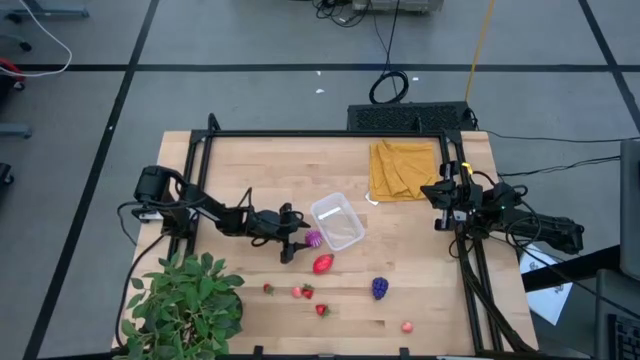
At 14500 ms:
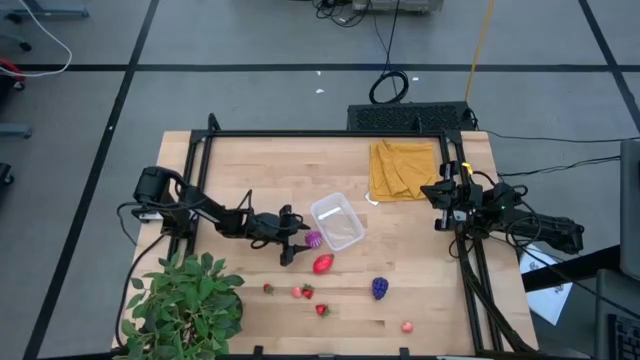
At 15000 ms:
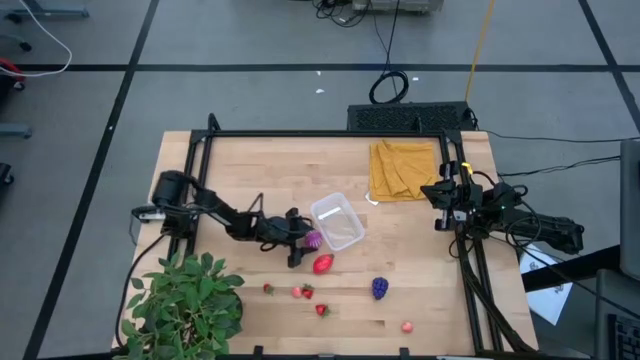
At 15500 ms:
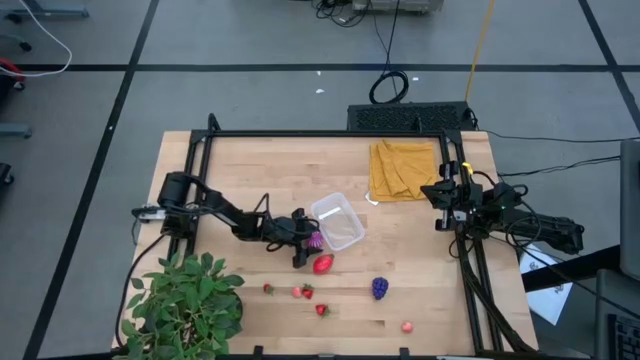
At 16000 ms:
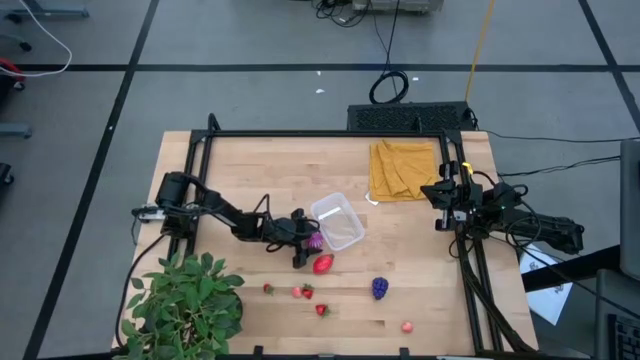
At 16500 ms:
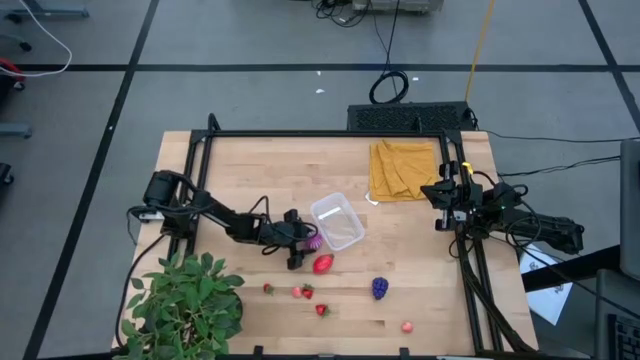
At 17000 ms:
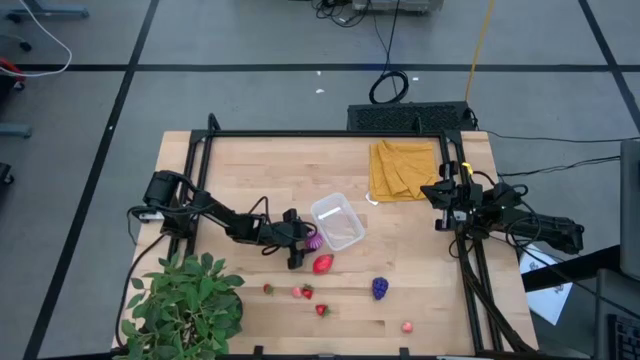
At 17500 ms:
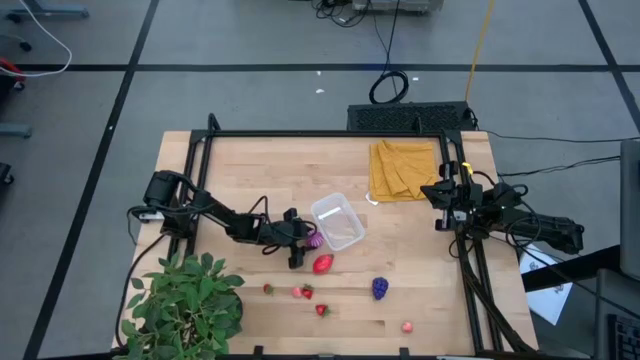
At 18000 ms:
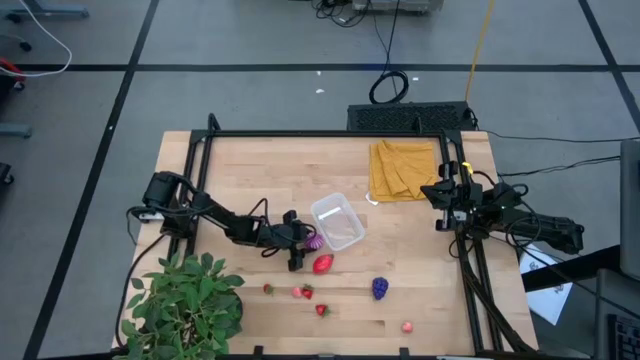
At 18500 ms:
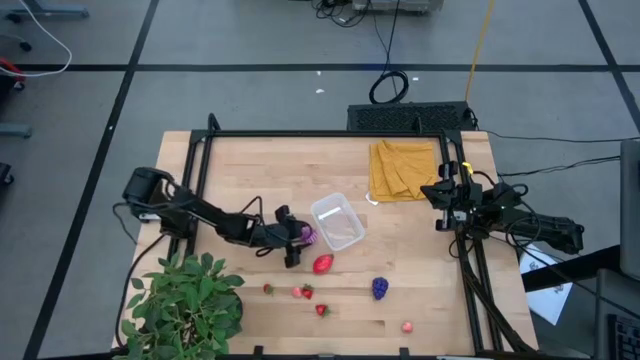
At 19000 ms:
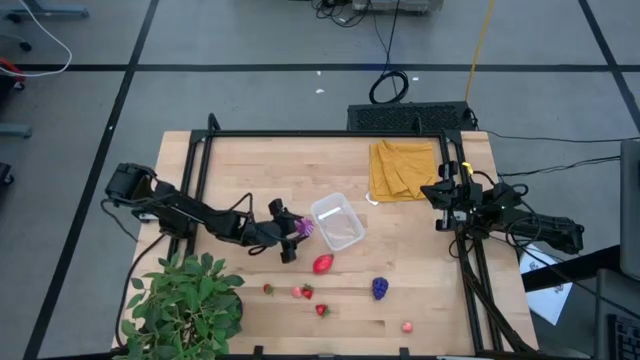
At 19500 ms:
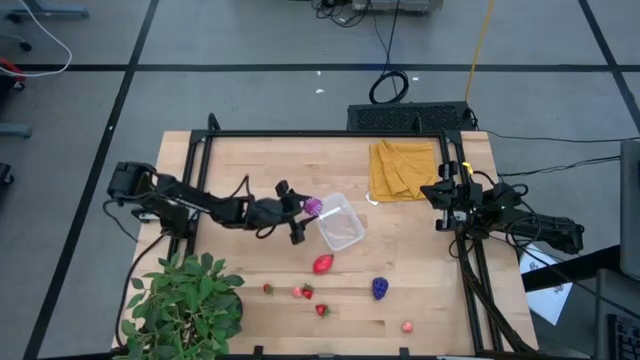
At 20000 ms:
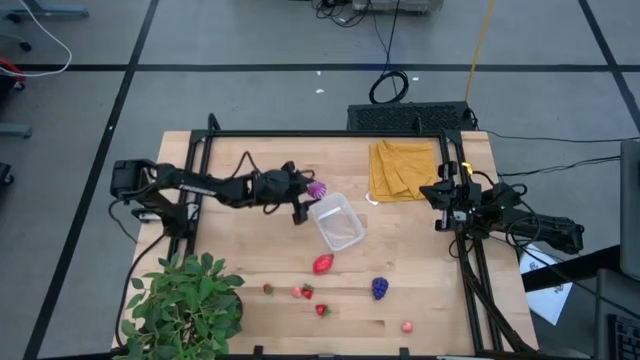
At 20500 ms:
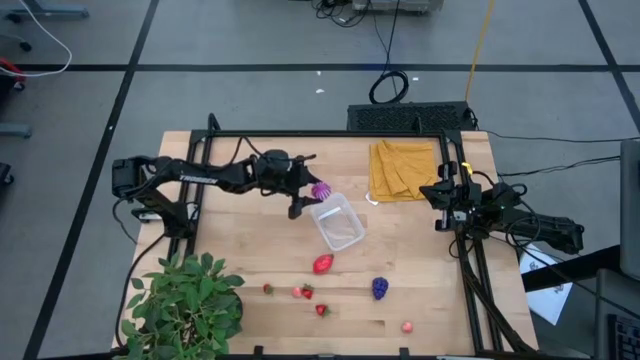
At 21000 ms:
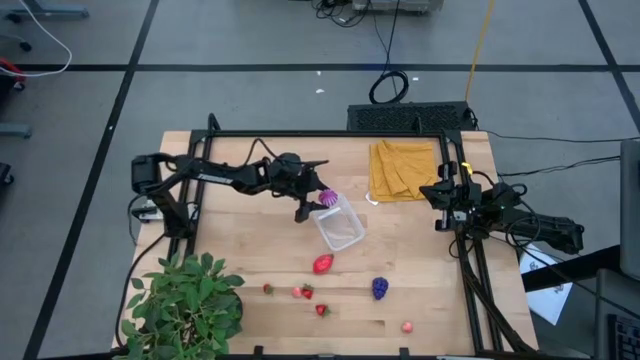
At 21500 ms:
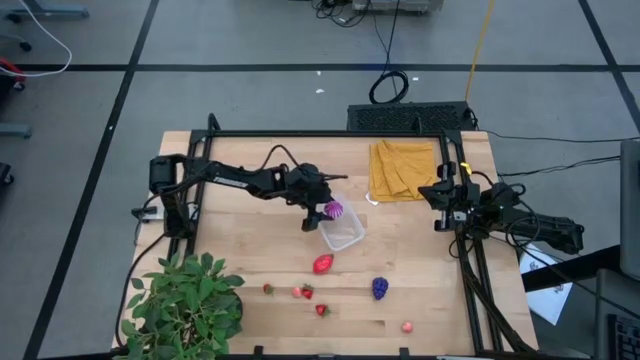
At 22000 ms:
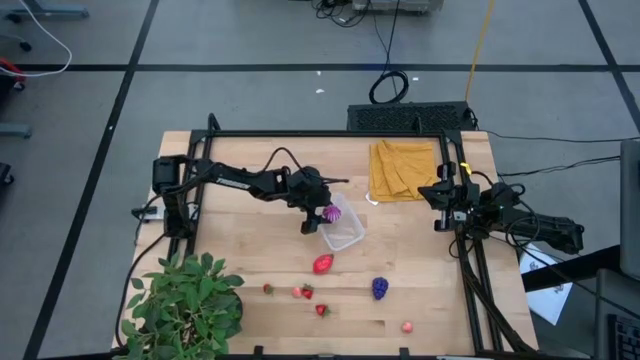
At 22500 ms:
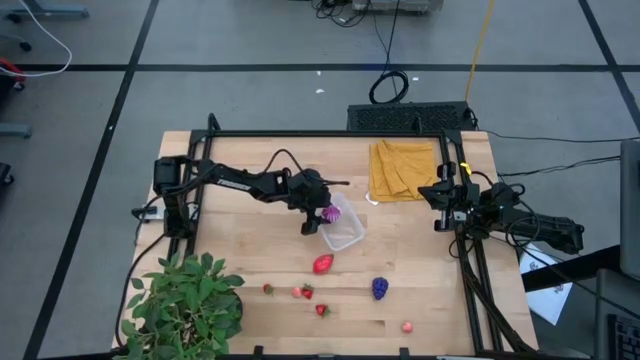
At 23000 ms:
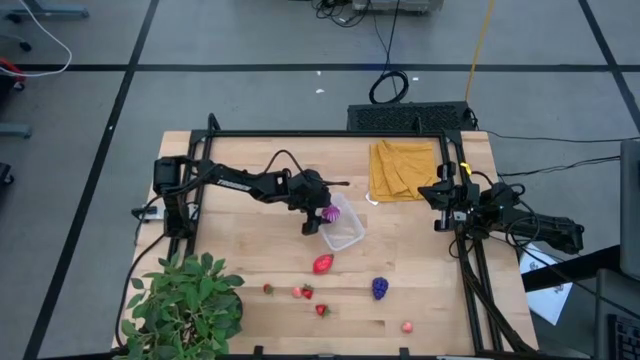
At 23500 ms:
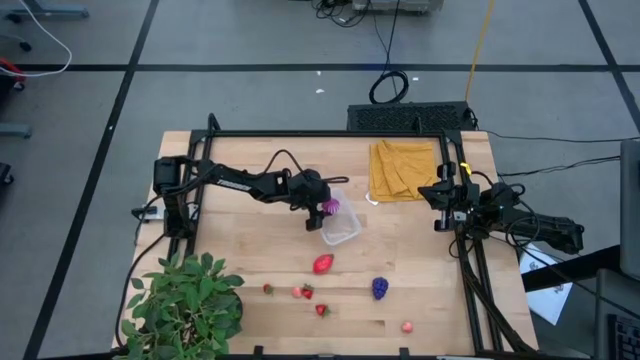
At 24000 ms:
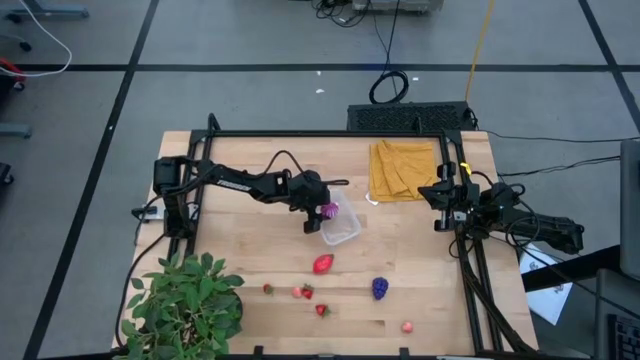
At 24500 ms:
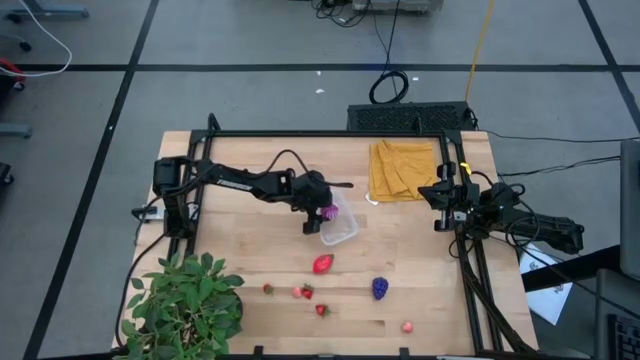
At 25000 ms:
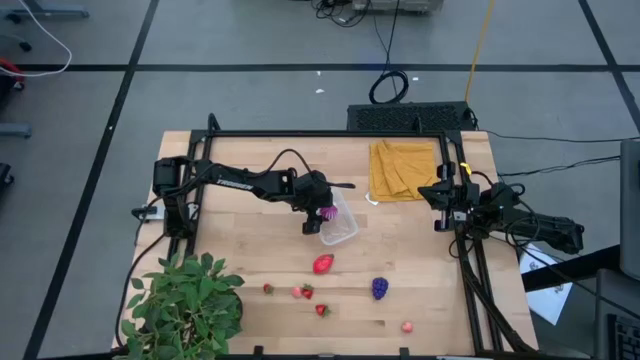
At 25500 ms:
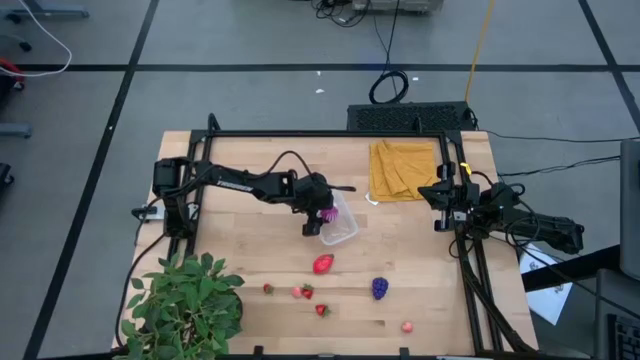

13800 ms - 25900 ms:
Task: Pick and placing Produce into tupperware
Put the violet onion into the transparent container

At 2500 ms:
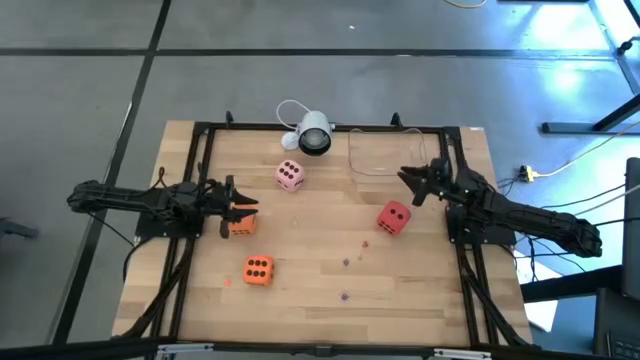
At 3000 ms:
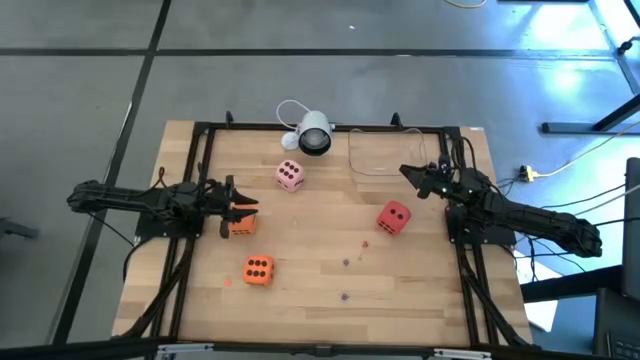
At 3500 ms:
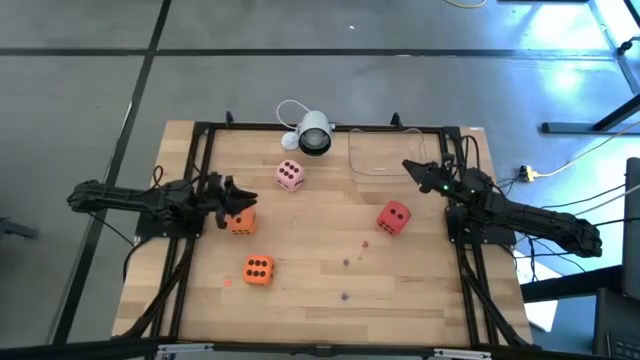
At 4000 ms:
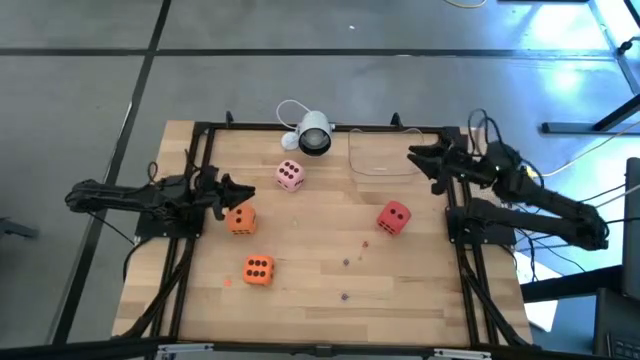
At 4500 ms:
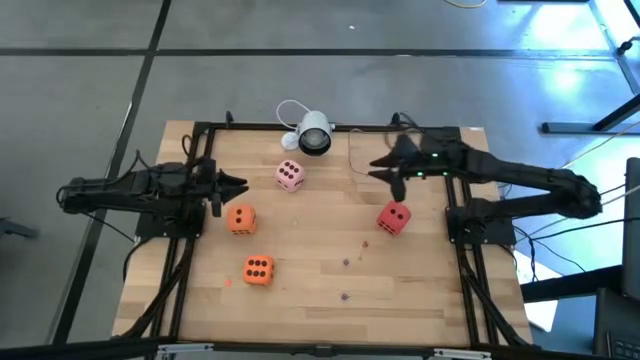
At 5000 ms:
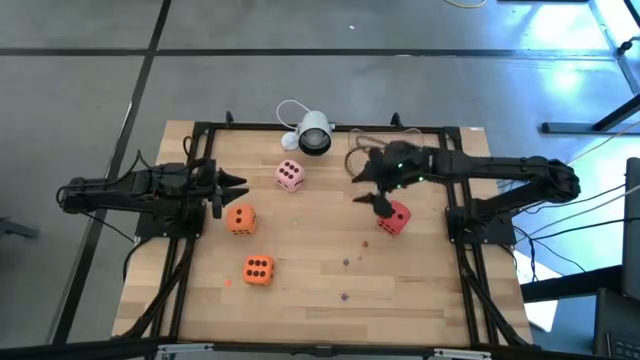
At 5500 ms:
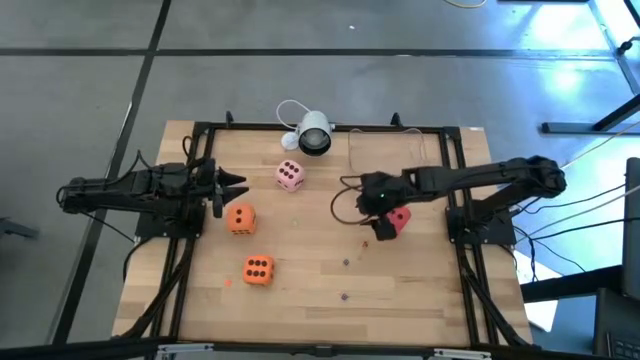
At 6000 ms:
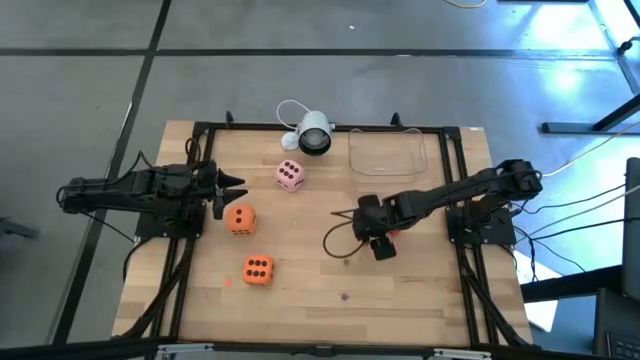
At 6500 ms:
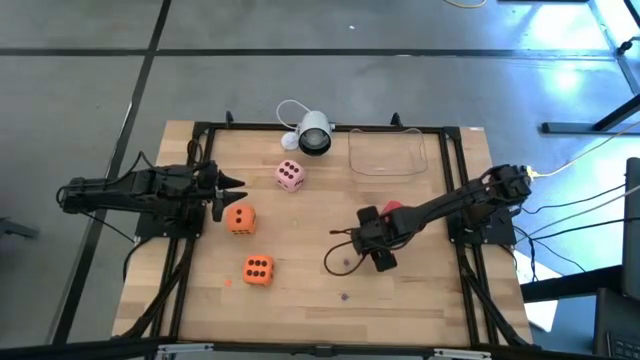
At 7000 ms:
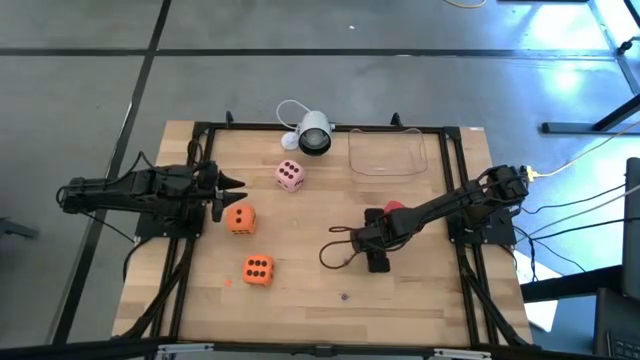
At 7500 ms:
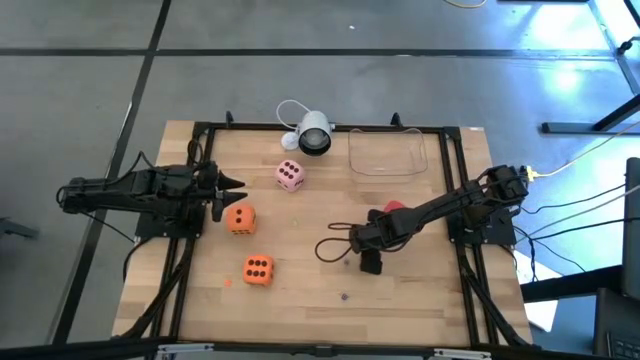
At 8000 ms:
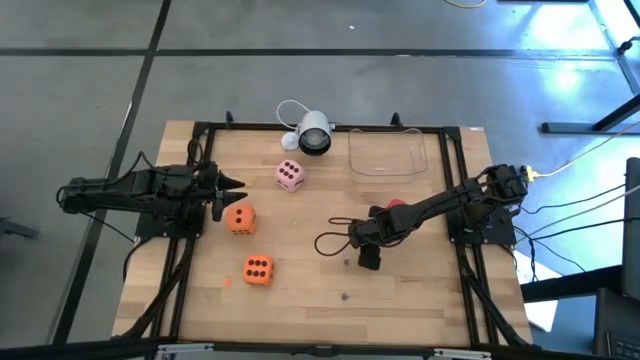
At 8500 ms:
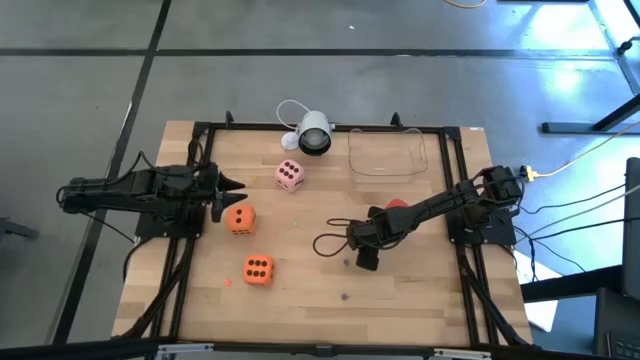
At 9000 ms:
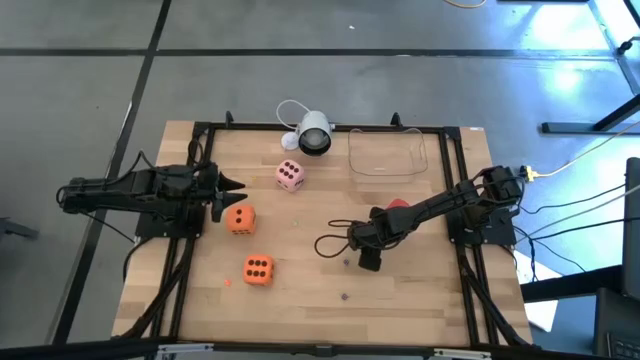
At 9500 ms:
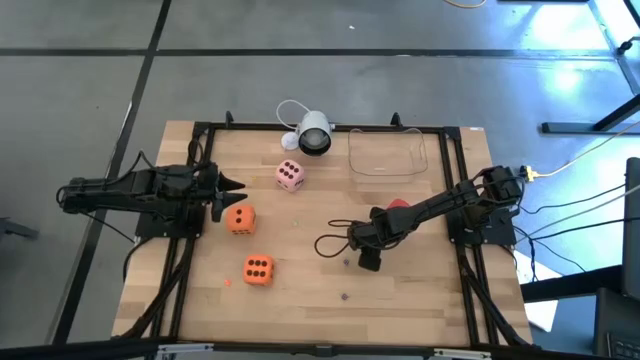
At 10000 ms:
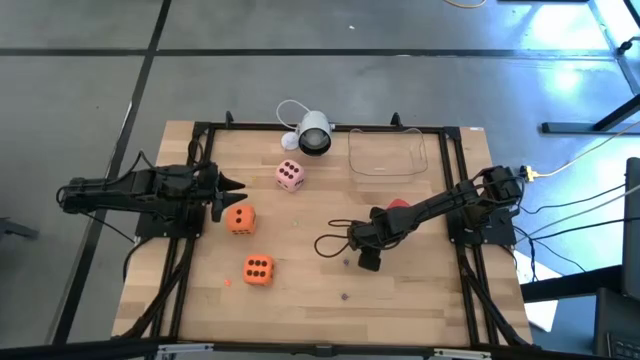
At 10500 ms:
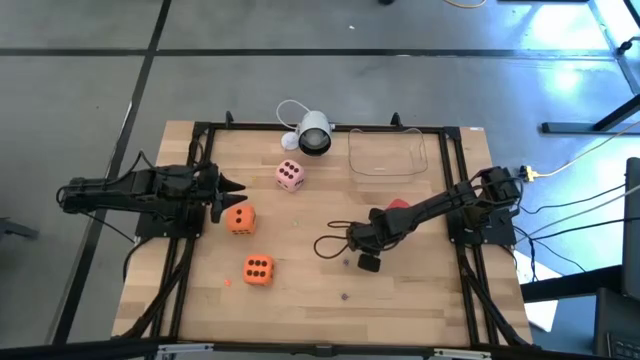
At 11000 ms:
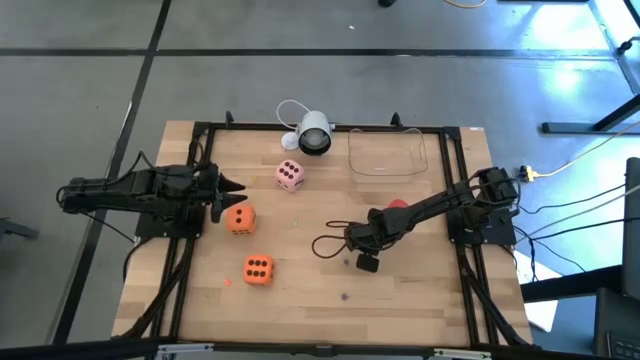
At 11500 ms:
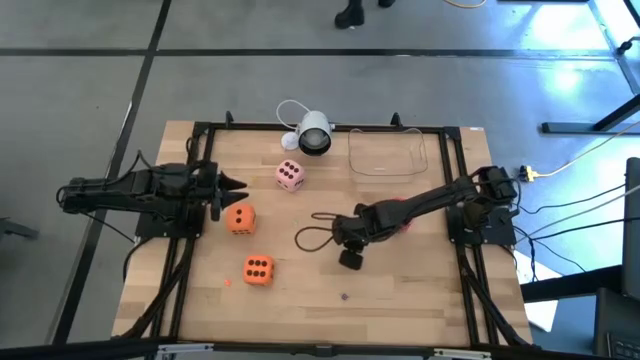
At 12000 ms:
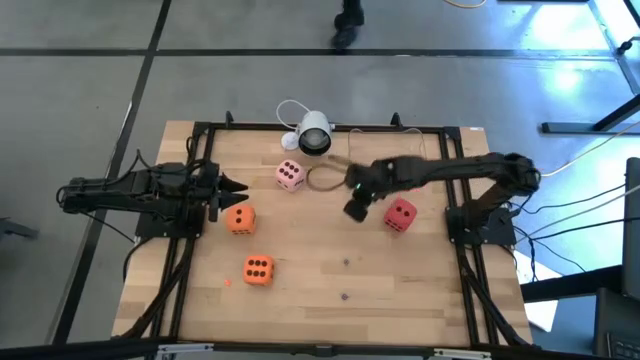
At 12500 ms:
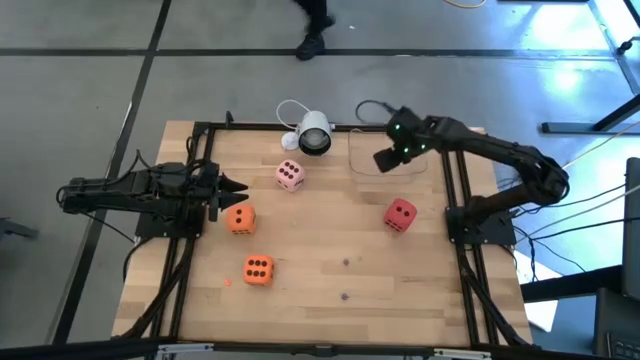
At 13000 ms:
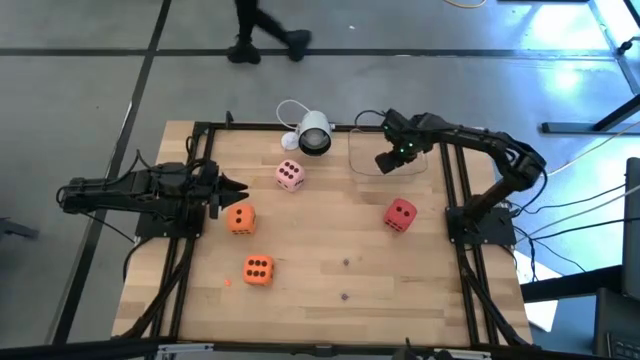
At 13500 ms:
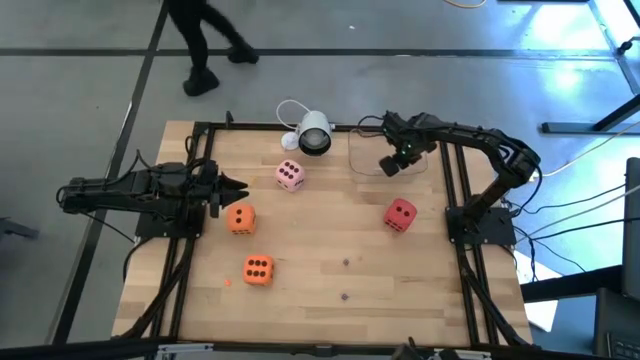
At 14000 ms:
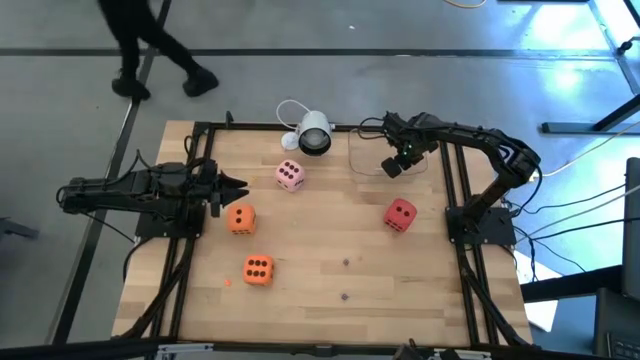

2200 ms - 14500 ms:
Task: Pick & Place Dice
Put the small red dice into the transparent container
